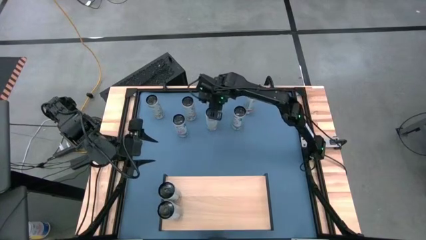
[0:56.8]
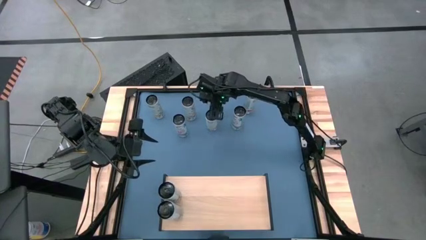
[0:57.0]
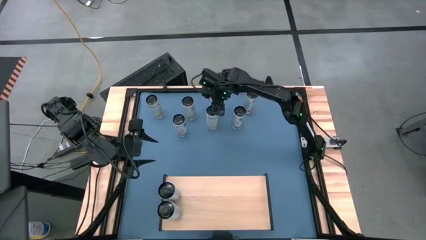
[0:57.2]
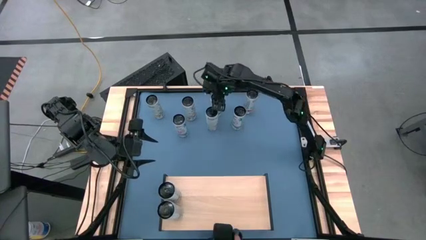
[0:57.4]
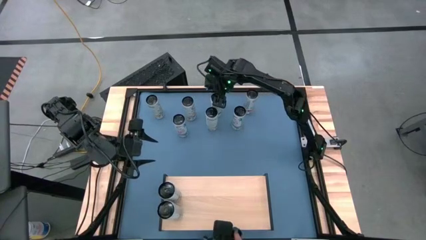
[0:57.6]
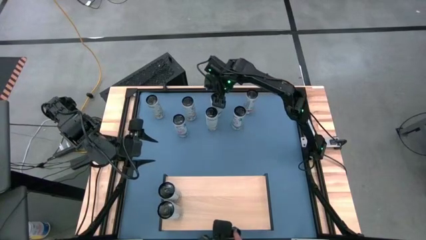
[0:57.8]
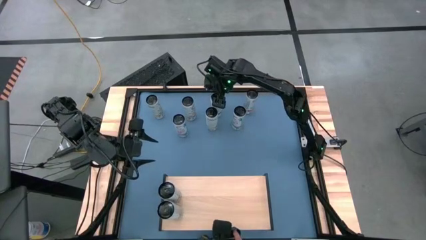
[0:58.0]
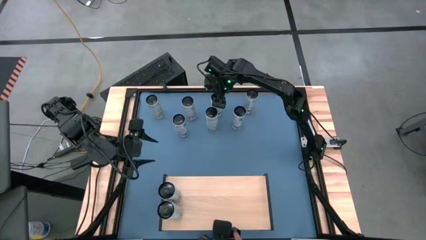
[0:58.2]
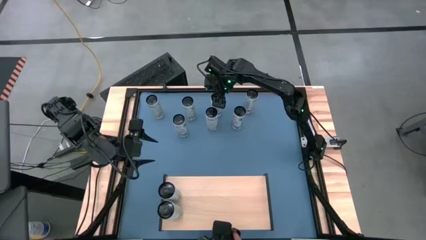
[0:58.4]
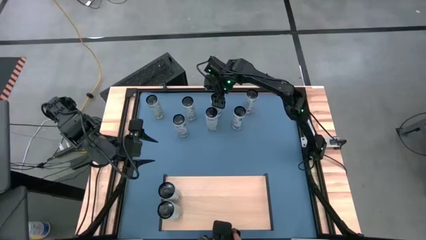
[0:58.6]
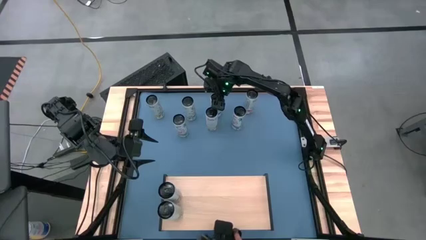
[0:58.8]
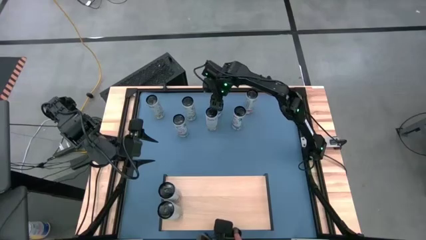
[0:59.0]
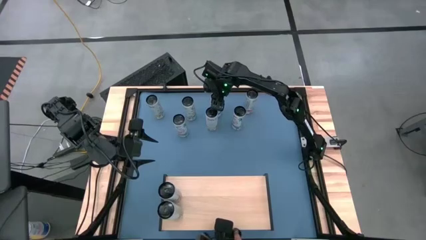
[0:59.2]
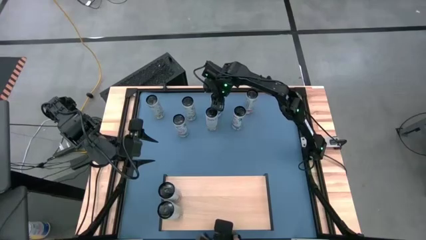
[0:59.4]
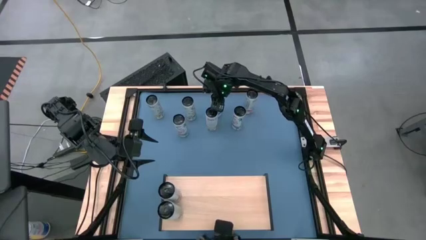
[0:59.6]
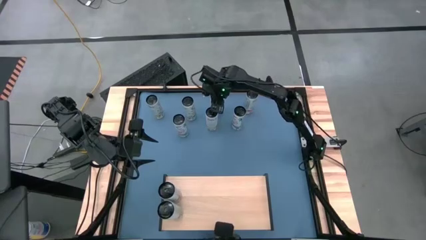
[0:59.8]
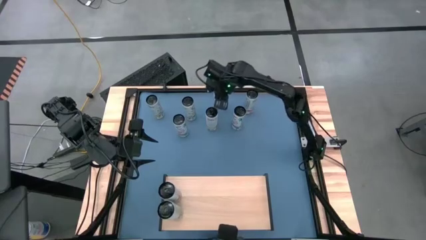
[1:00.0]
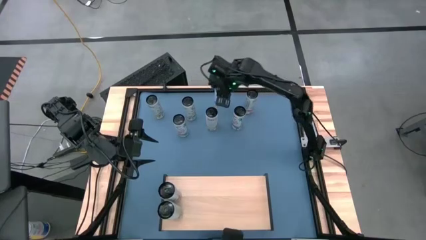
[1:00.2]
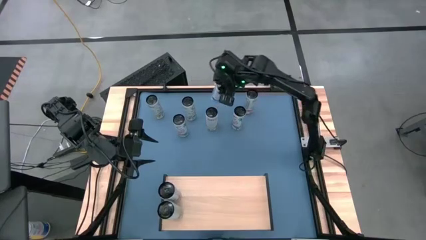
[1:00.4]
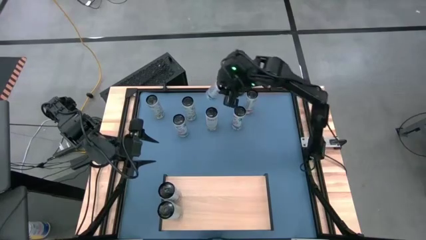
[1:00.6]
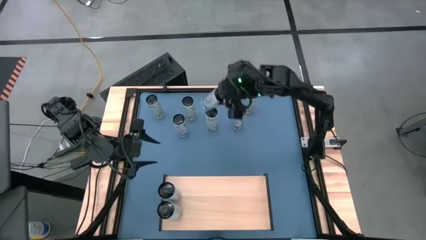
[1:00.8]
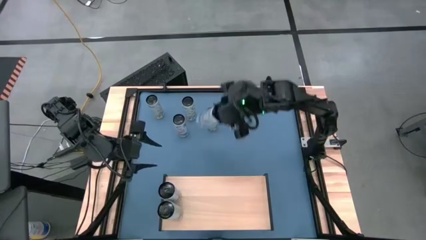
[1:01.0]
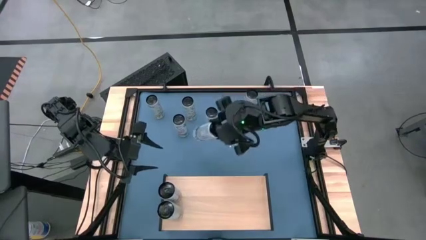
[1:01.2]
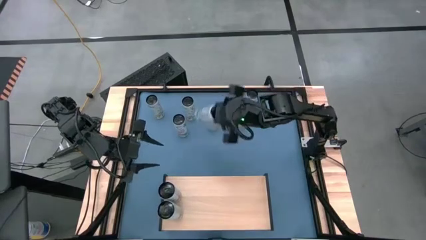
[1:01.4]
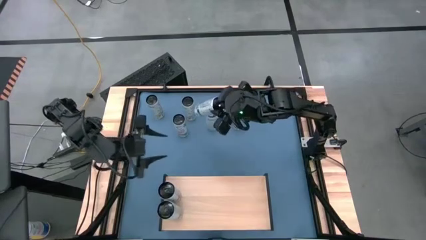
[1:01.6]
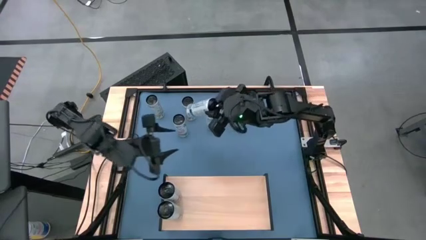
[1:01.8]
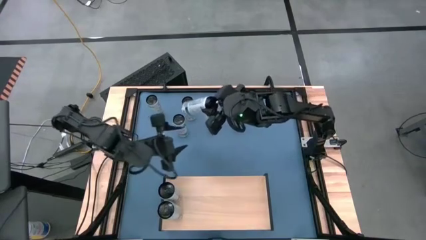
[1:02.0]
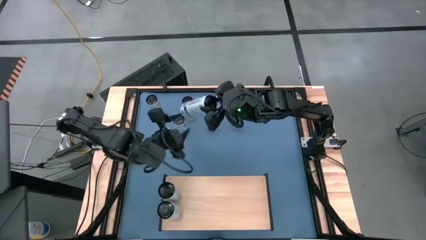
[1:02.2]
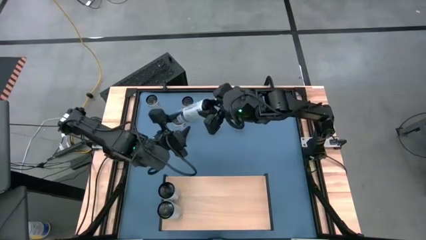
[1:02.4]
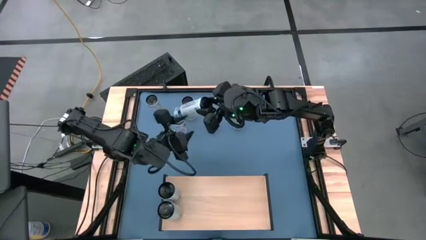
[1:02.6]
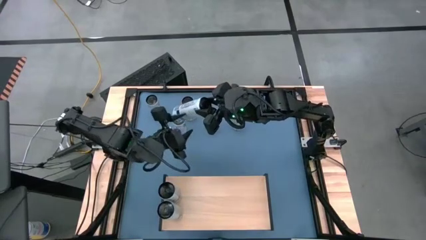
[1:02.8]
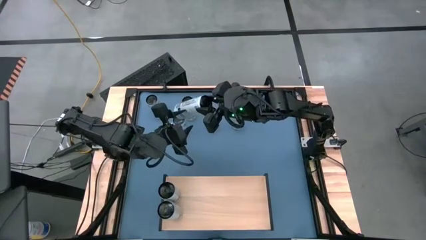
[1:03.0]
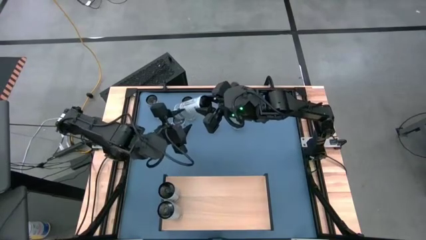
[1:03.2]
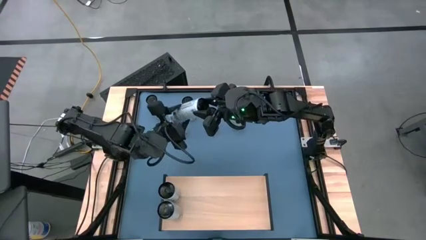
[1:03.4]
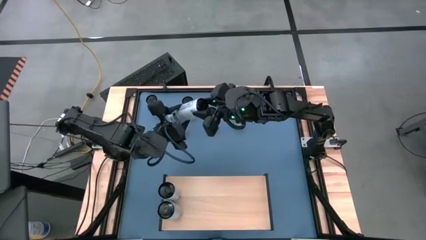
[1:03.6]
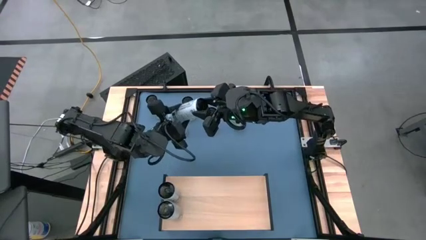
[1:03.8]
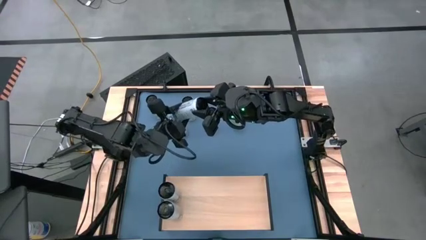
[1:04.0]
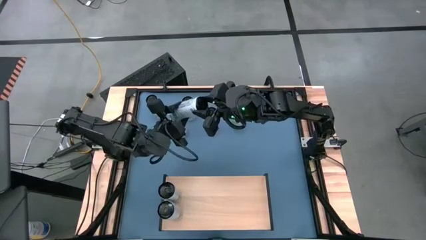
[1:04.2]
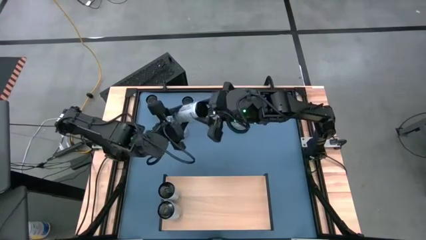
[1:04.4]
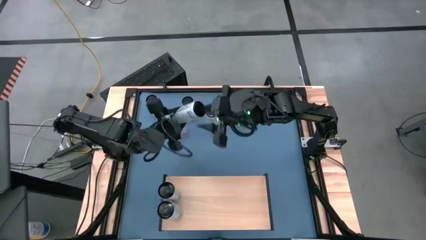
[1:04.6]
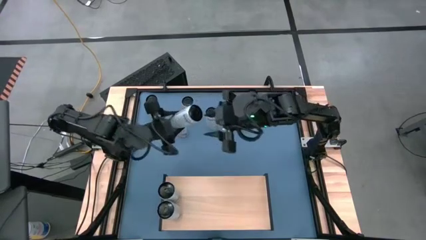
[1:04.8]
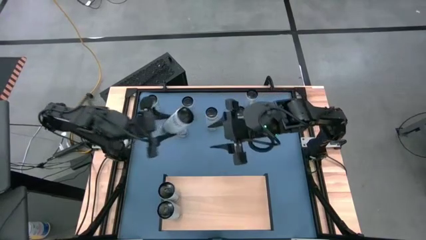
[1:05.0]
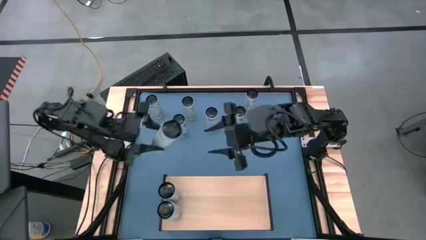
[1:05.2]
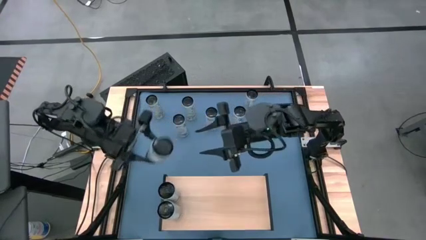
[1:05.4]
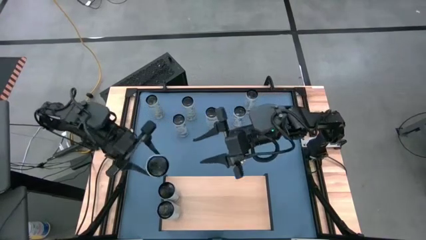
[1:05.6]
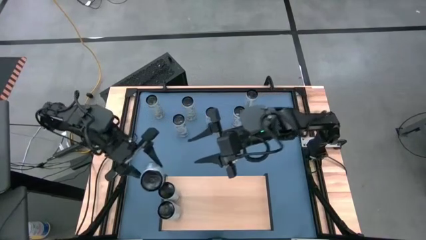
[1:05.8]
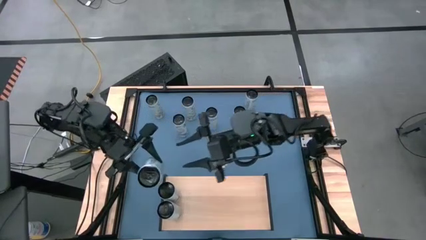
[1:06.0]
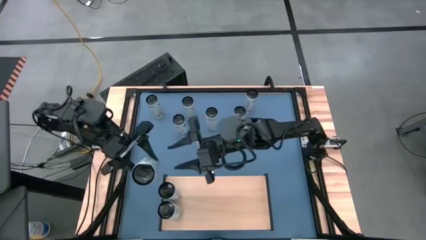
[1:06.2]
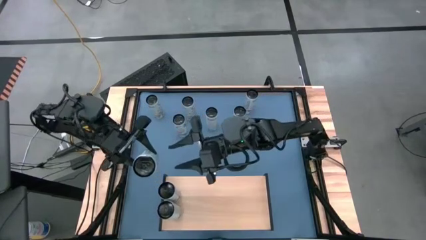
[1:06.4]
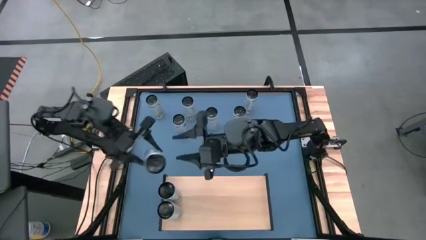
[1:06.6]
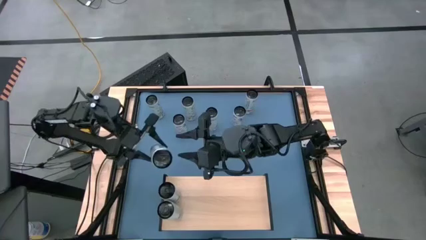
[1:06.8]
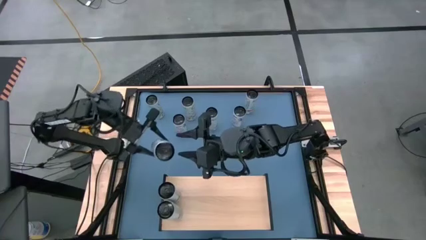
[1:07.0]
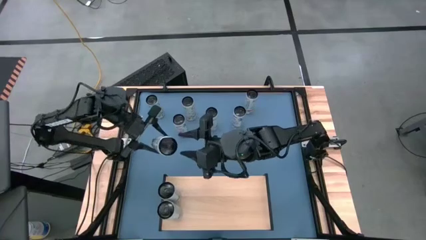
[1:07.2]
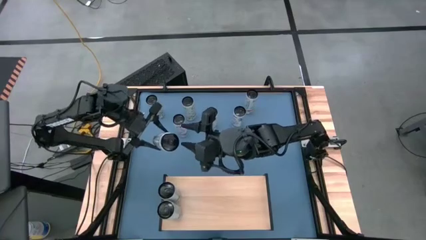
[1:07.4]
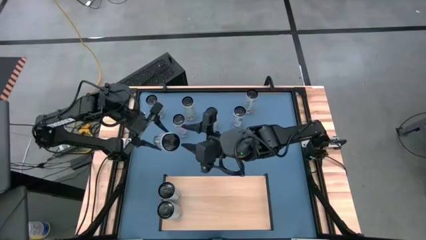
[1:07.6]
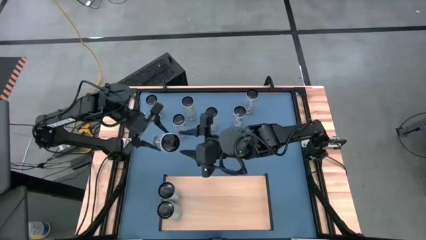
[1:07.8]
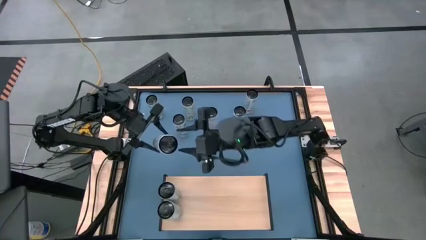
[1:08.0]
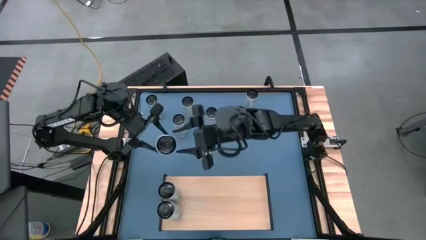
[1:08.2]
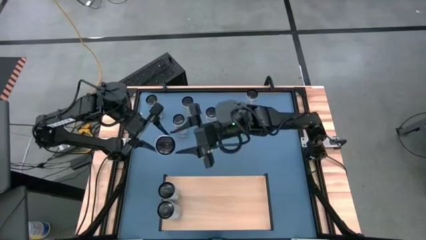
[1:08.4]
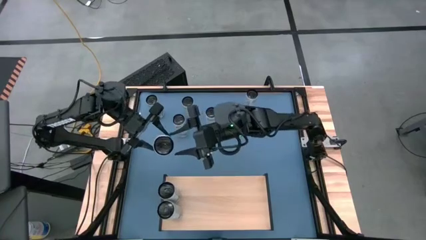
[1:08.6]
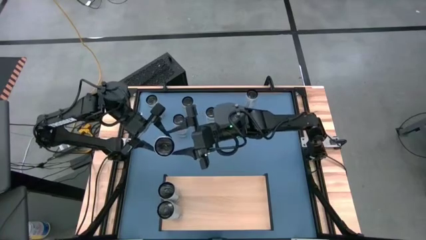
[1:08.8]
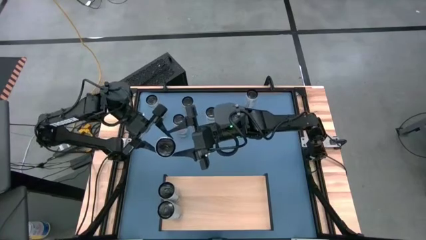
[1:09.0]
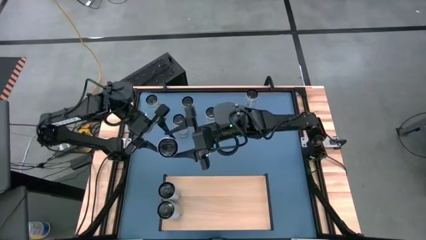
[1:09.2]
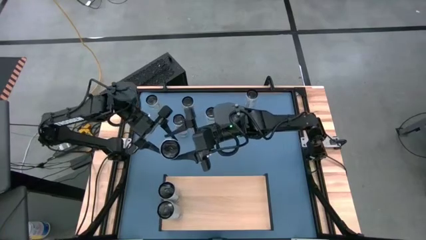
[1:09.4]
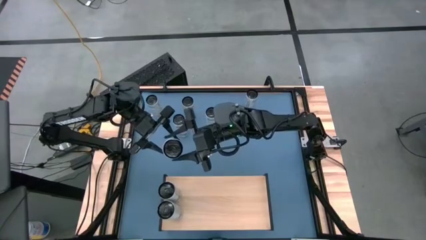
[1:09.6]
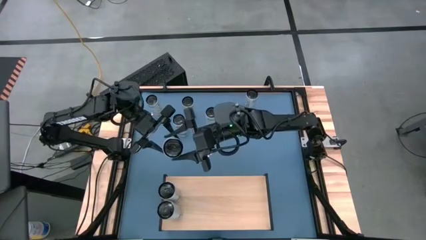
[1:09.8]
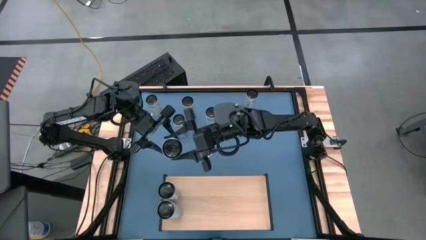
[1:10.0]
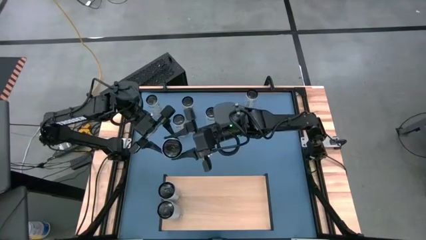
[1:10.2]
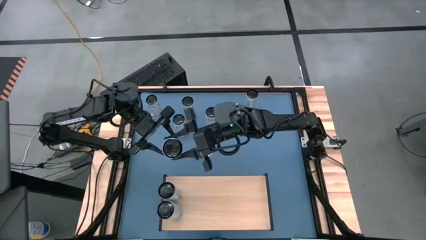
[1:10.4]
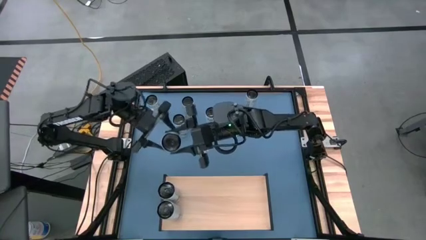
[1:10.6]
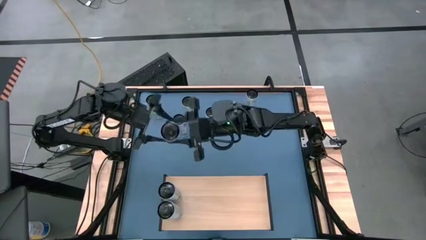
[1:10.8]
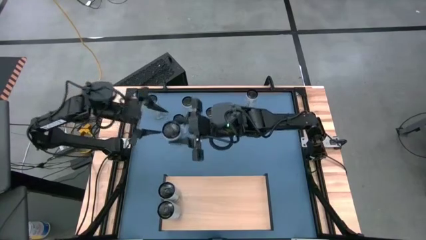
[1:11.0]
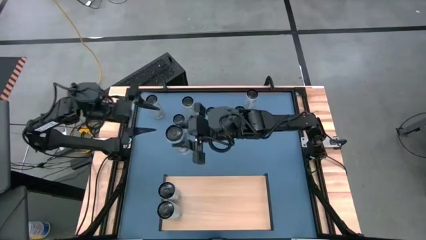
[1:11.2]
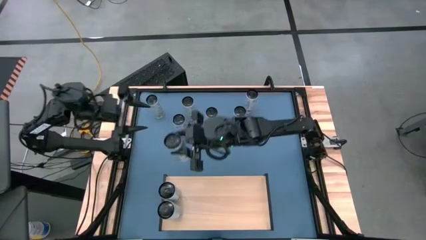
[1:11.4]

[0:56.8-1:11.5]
Task: Place canned beverage on shelf
Put the white blue soda can on the shelf aligned with the other white blue soda cans

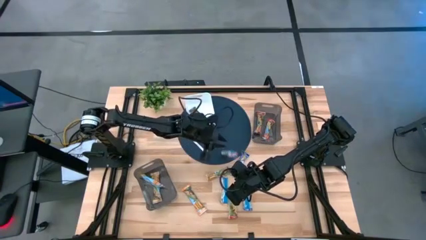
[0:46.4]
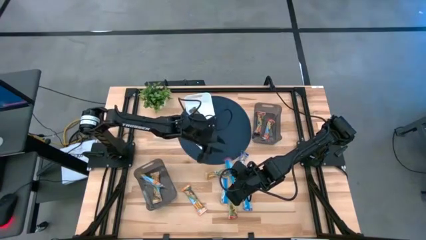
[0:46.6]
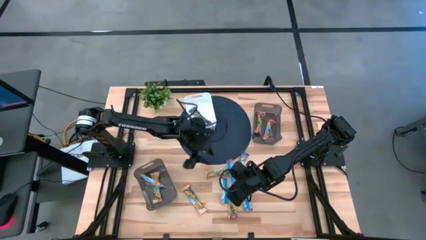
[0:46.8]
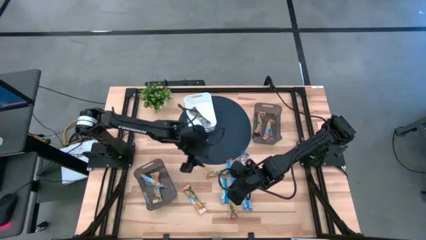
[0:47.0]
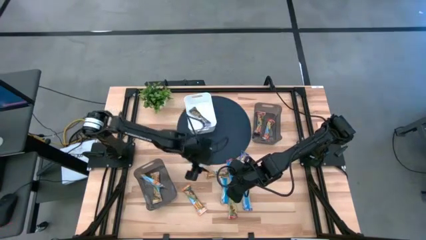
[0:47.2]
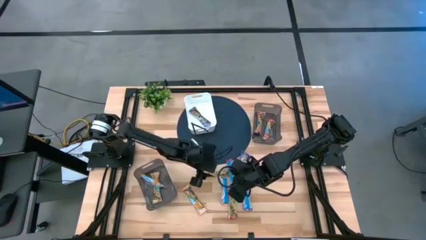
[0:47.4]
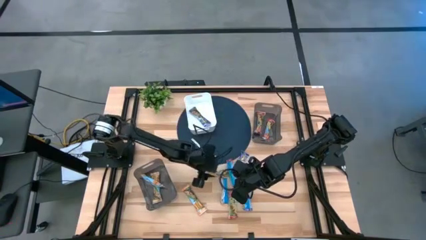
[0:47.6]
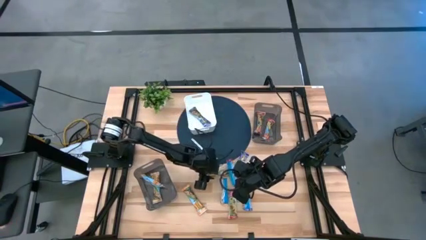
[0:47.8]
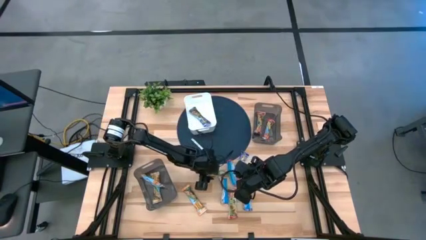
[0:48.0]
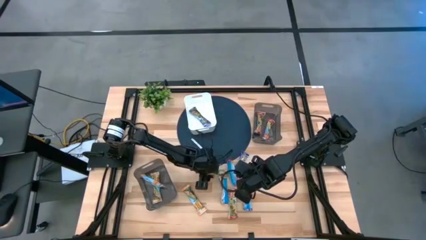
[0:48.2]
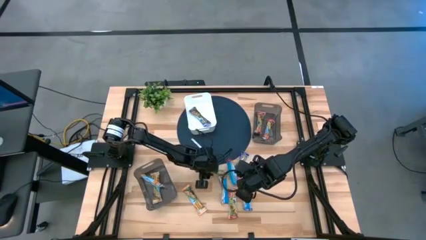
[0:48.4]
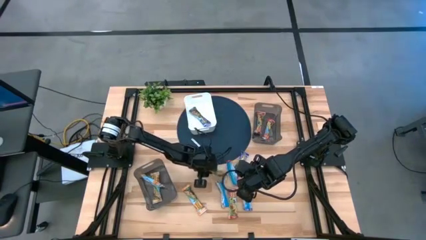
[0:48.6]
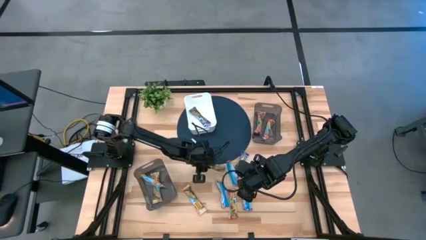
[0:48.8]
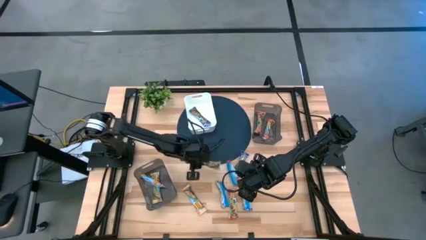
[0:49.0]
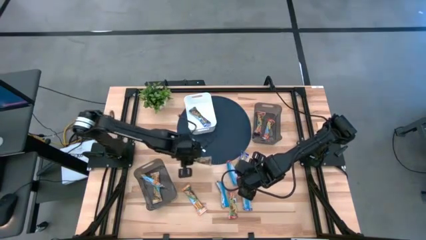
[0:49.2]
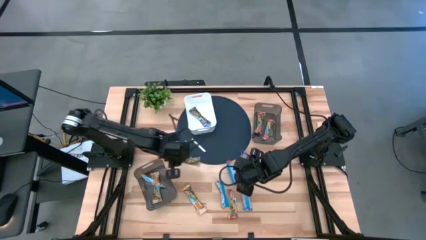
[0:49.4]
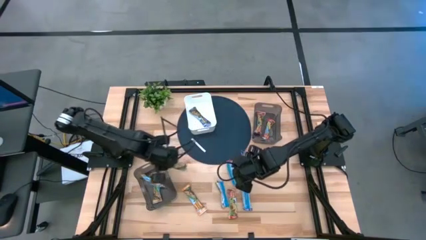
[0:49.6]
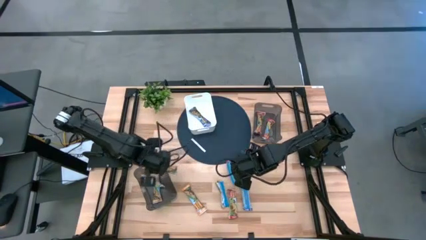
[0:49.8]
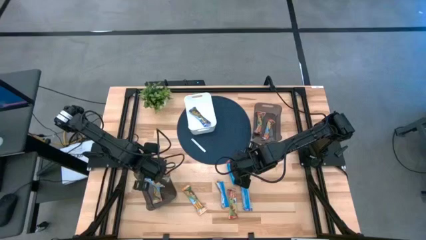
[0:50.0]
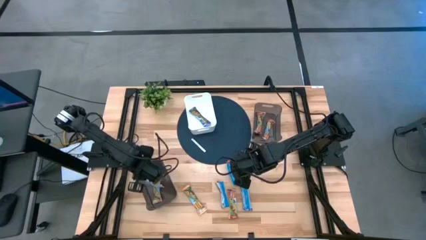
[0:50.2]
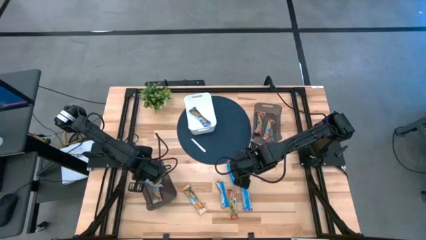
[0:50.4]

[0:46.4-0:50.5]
Task: Pick and place Granola Bars by type
Put the top yellow granola bar into the bottom black bin
